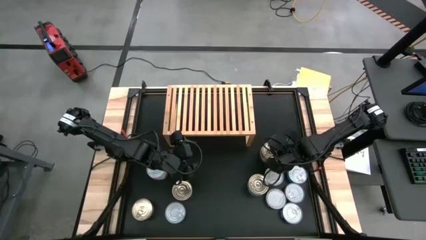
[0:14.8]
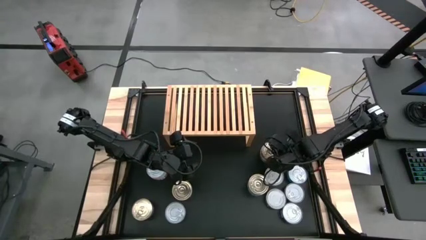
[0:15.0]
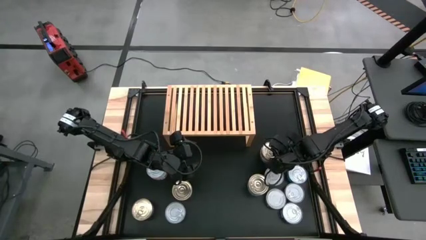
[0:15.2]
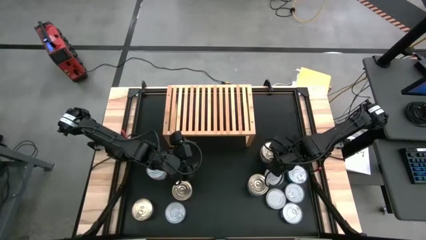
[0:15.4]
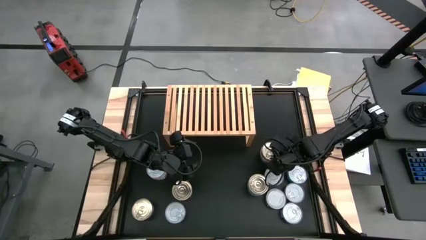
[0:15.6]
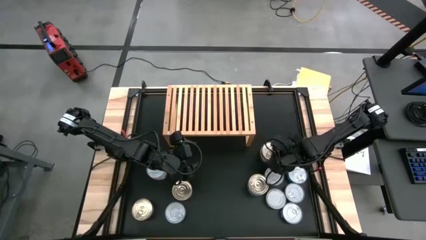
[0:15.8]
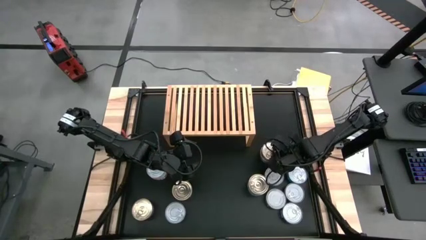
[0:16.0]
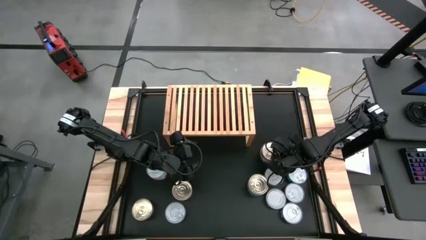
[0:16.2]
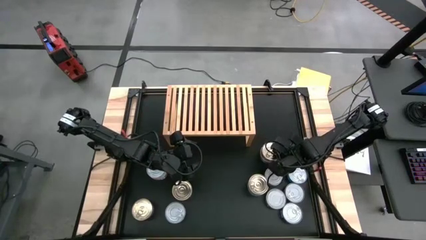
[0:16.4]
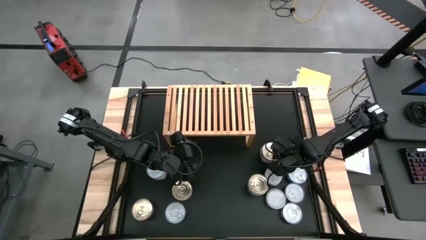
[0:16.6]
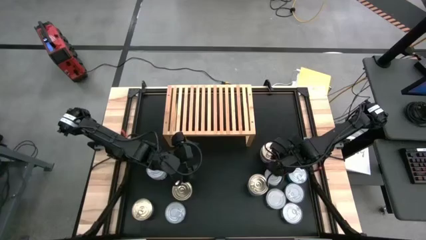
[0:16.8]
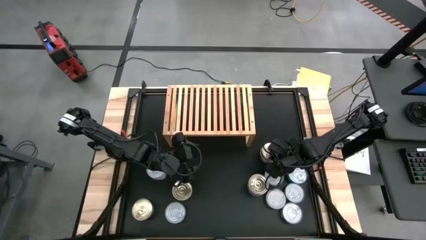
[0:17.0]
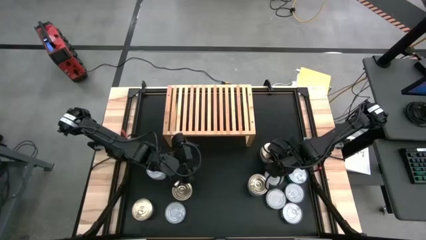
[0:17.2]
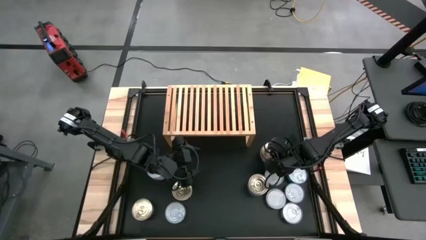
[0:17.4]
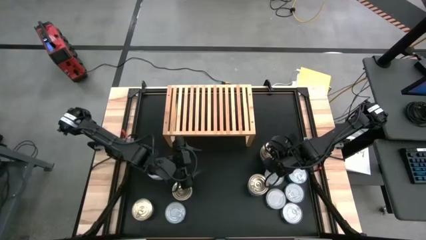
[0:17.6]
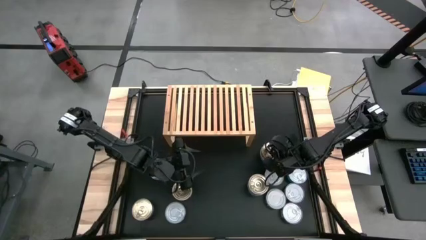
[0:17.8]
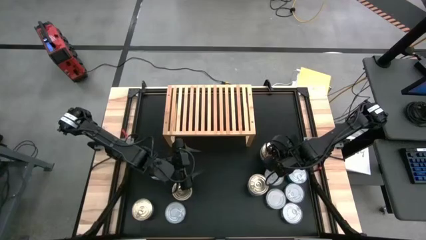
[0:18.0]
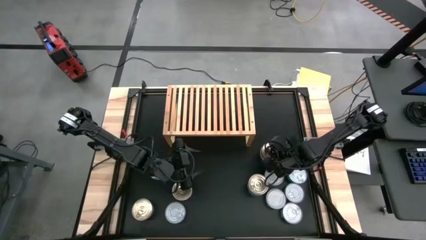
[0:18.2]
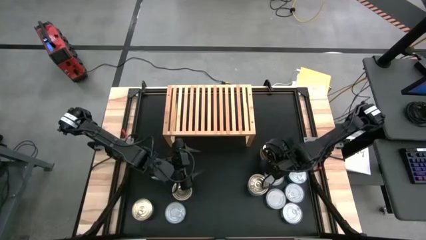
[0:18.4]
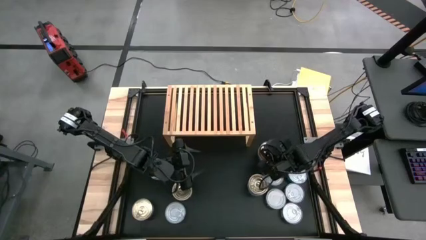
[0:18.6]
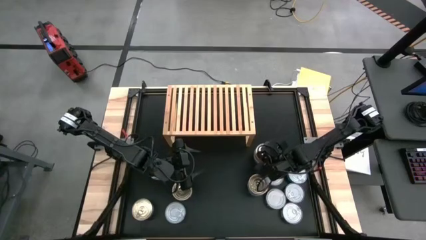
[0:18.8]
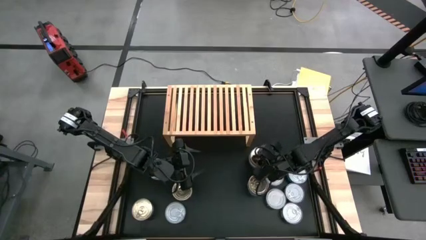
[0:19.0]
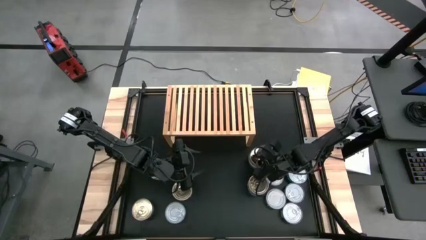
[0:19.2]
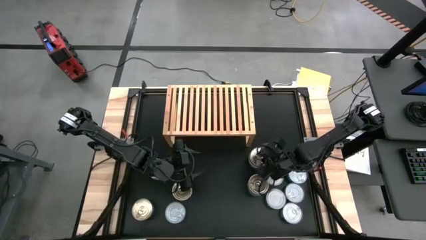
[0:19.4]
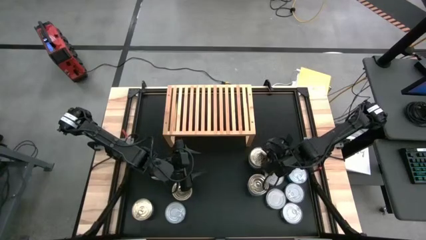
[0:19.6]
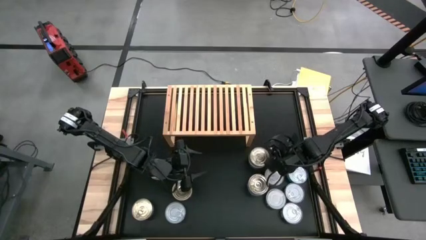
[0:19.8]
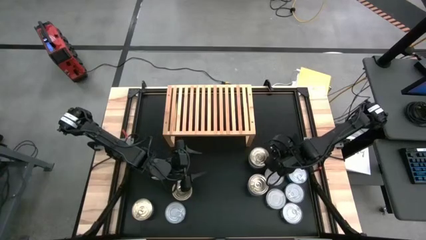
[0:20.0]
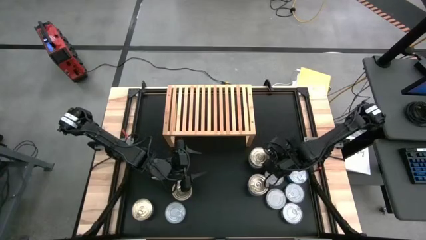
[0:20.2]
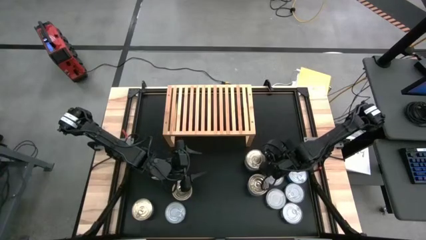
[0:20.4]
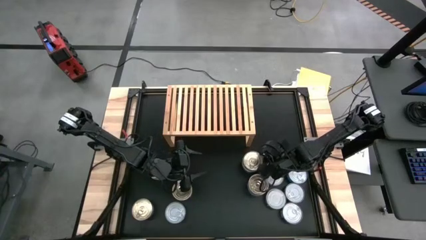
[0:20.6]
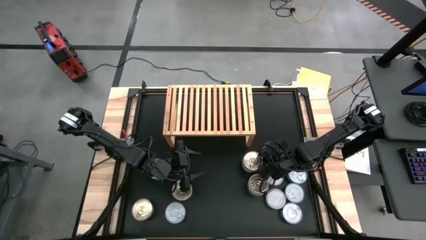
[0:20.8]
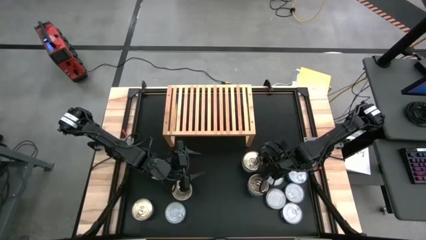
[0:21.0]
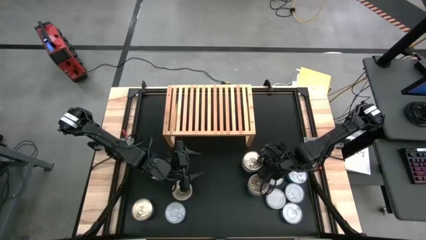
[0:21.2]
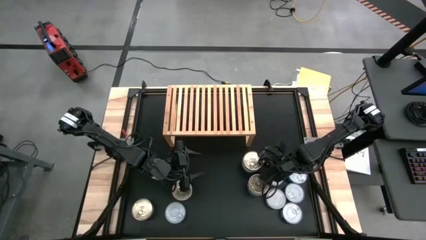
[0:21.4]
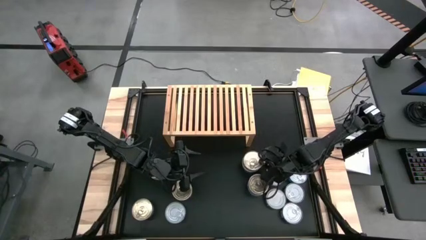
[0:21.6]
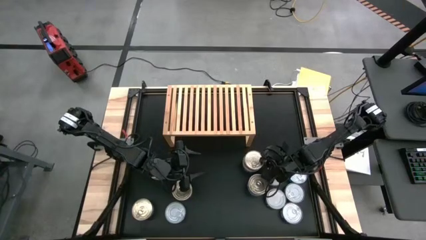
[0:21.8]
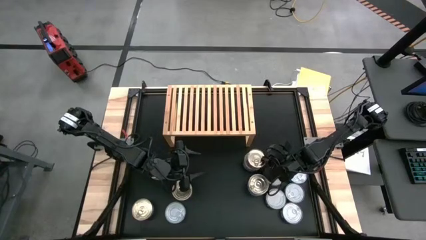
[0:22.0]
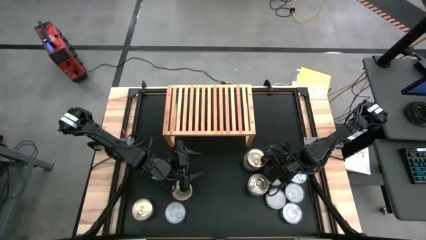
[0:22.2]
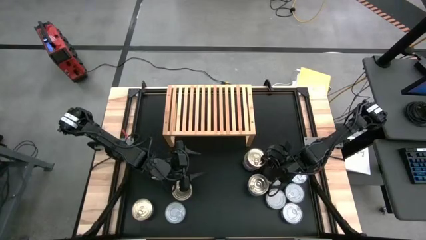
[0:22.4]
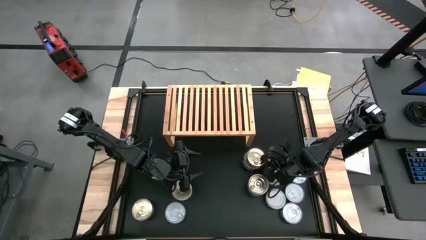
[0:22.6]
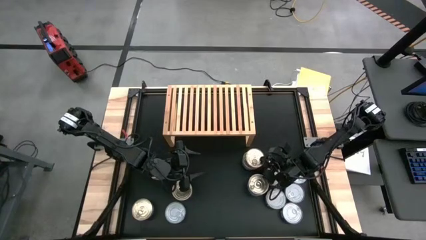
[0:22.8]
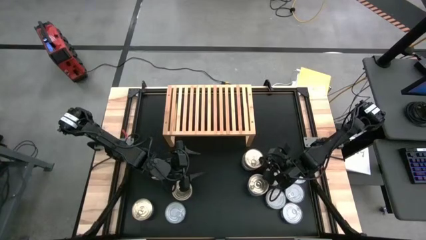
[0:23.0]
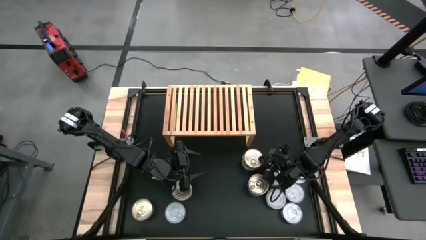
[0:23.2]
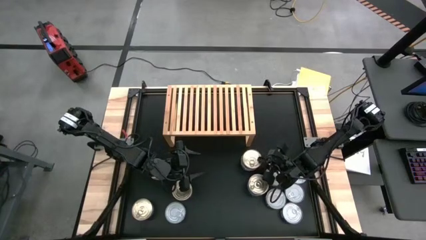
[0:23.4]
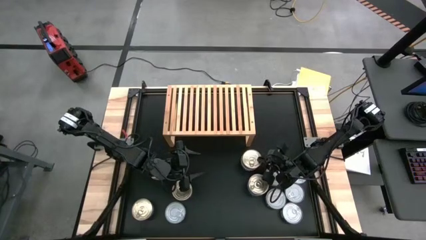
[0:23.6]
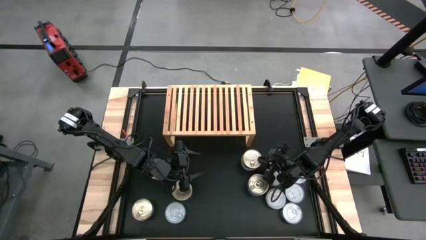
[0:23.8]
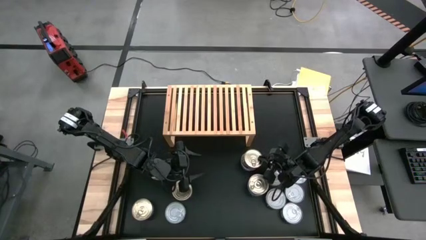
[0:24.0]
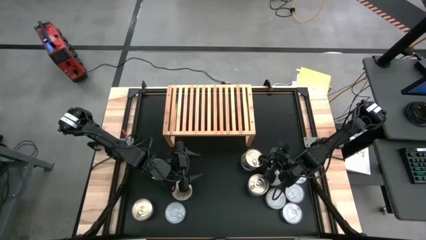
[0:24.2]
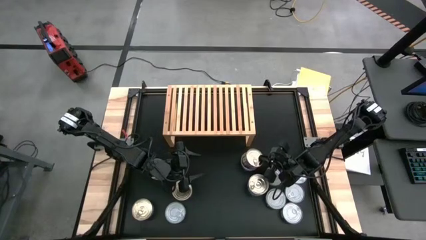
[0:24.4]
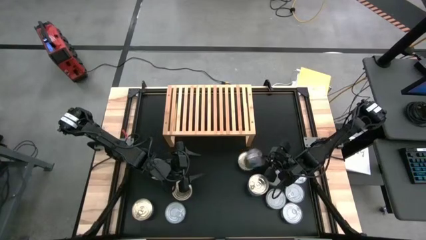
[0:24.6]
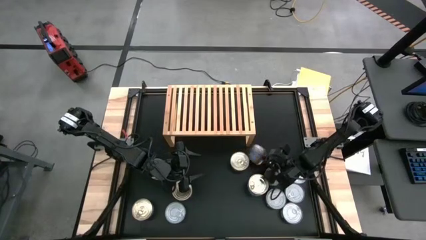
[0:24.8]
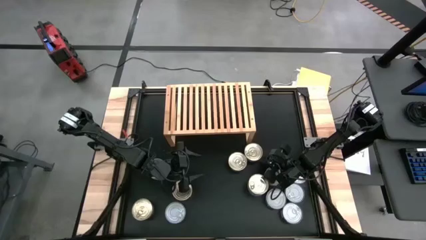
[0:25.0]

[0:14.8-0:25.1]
Task: Stack canned seafood by type on shelf
Put the blue and pink tuna can on the shelf

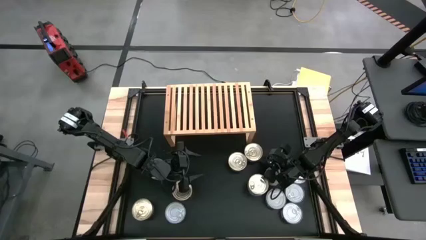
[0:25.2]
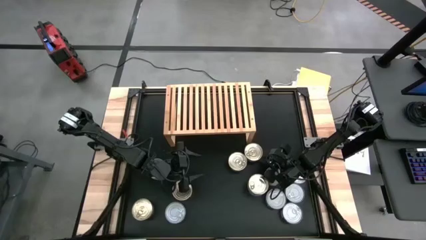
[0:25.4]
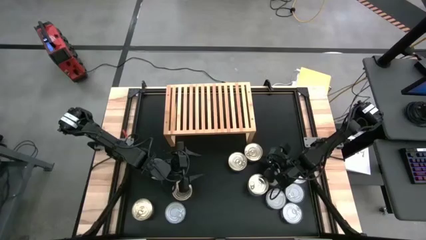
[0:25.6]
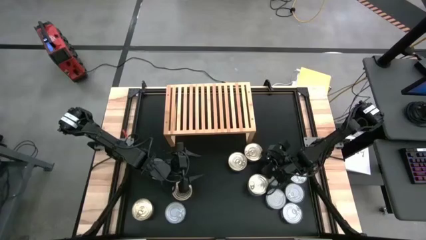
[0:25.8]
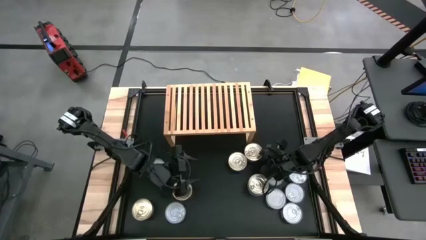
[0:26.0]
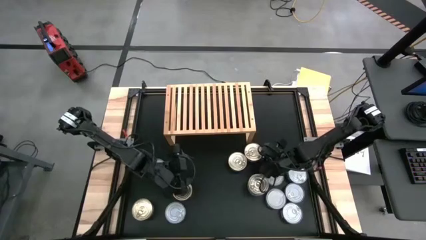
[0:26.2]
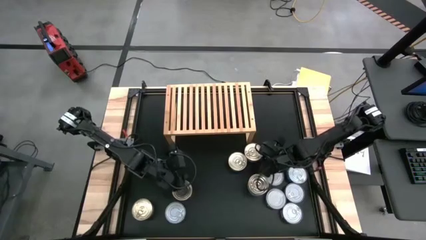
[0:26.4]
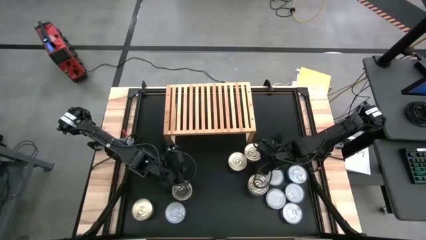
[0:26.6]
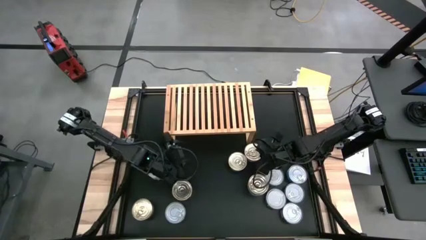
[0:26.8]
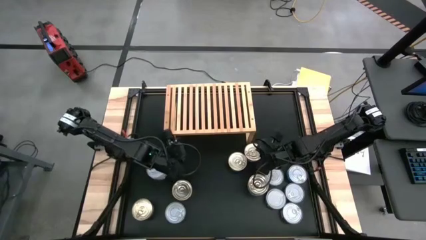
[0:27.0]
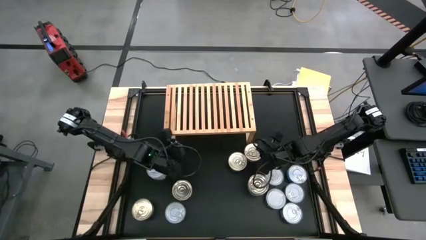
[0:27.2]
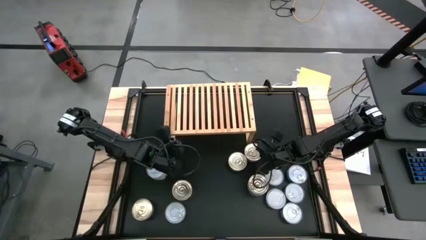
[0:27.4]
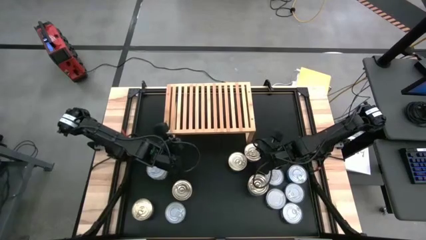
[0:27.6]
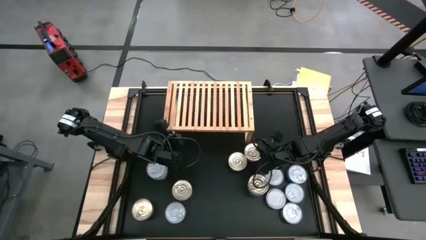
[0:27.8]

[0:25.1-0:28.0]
Adjust the shelf

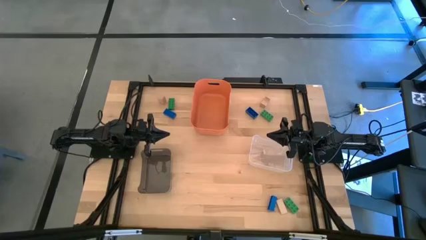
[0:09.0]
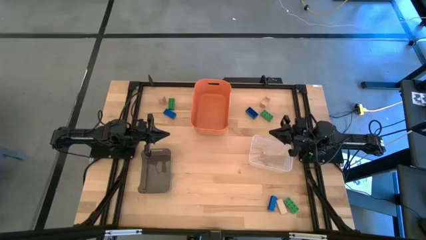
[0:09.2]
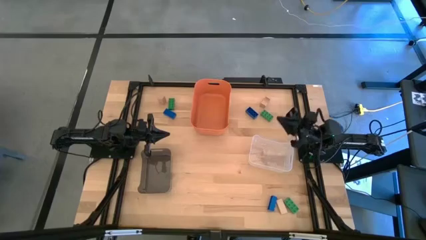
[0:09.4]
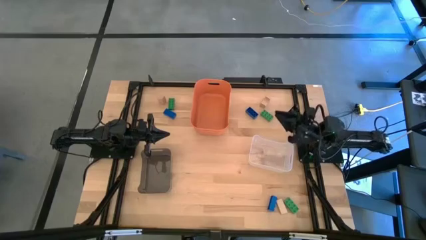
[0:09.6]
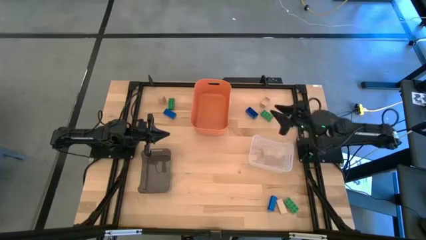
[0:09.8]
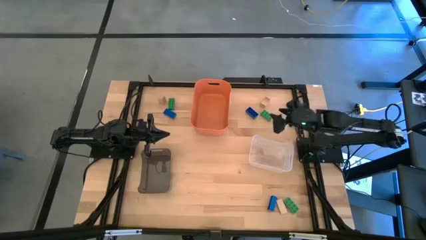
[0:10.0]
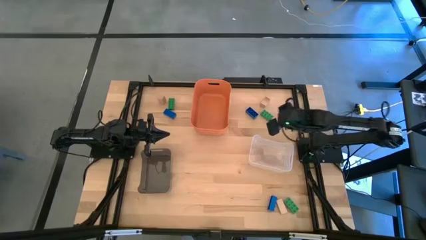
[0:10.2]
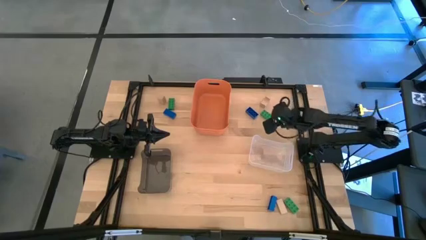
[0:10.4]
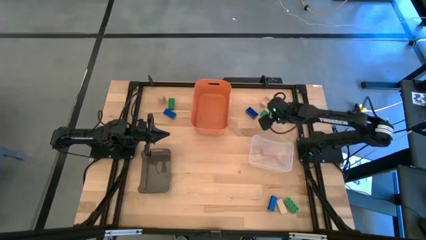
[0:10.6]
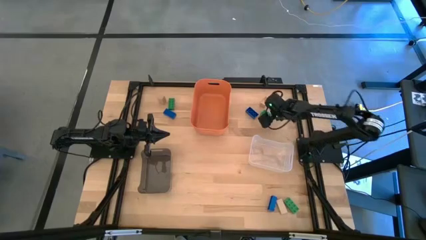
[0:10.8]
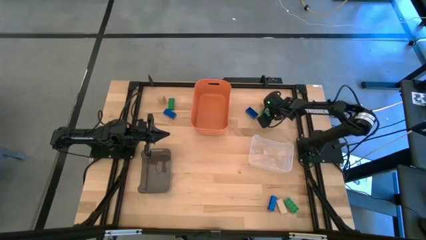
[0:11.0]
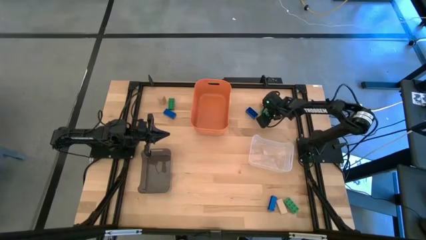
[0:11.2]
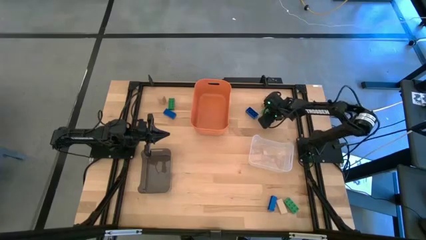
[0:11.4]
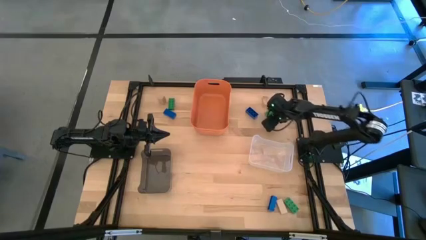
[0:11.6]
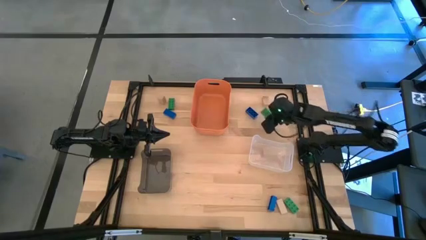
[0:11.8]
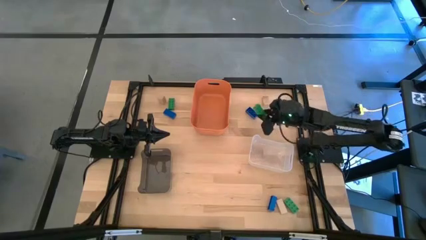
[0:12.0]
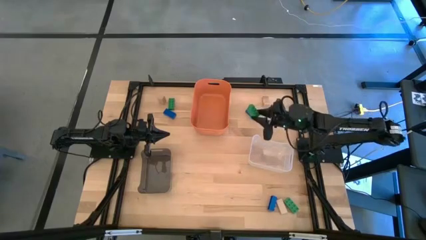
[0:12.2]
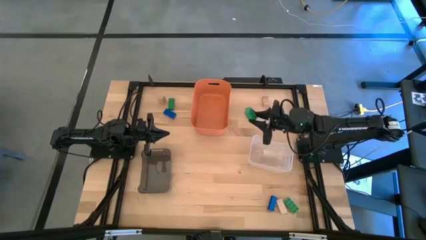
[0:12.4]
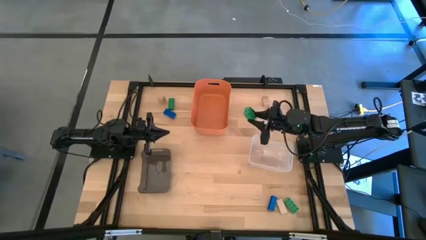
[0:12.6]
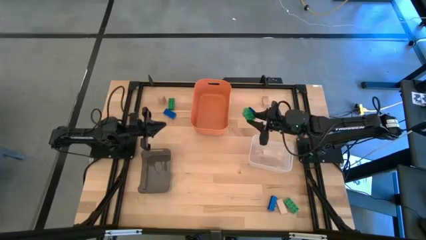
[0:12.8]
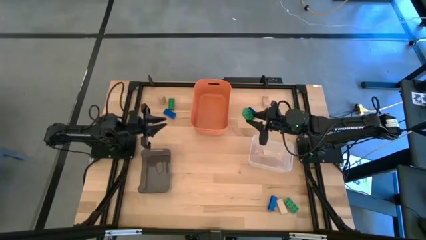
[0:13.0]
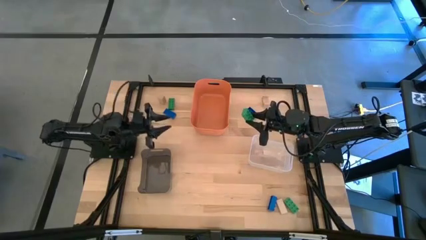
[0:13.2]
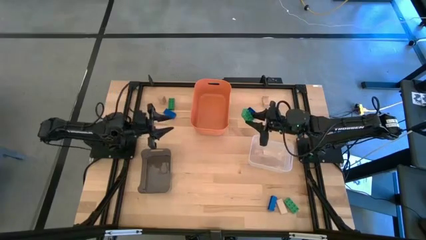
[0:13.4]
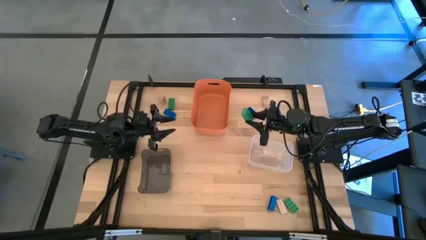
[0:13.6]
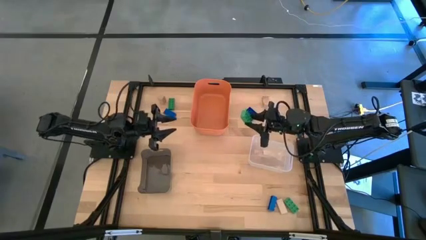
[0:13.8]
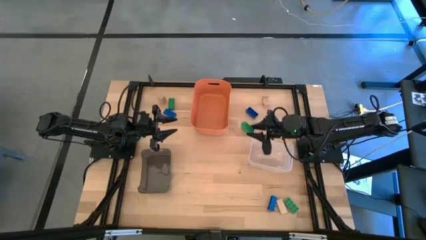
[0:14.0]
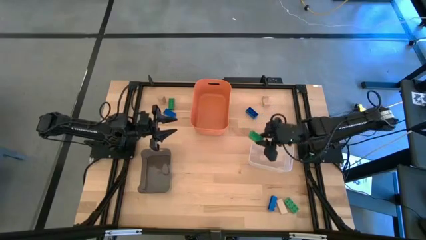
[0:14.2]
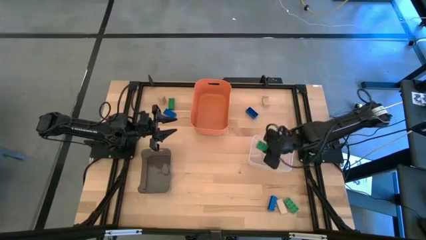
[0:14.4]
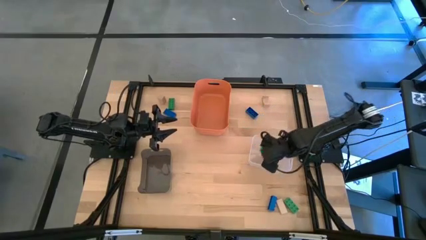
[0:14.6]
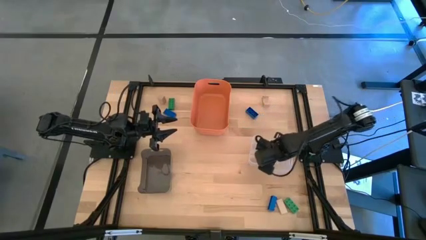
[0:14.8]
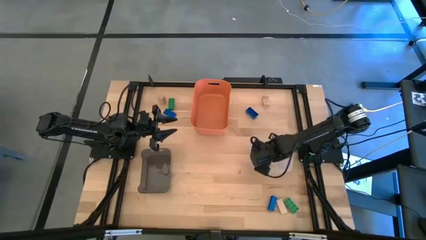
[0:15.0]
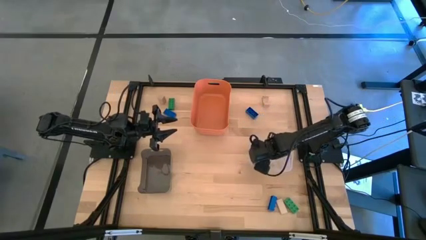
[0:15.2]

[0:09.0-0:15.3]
Task: Sort & place blocks by color
Put the top right green game piece into the transparent bin
